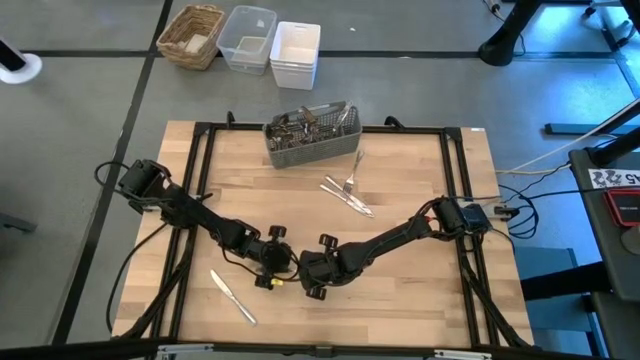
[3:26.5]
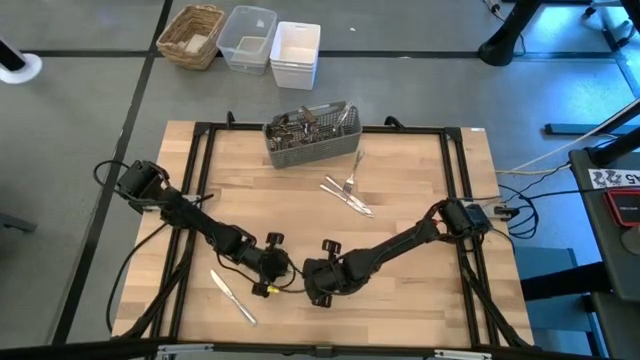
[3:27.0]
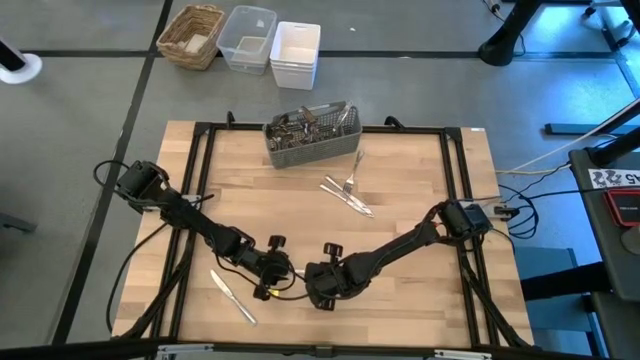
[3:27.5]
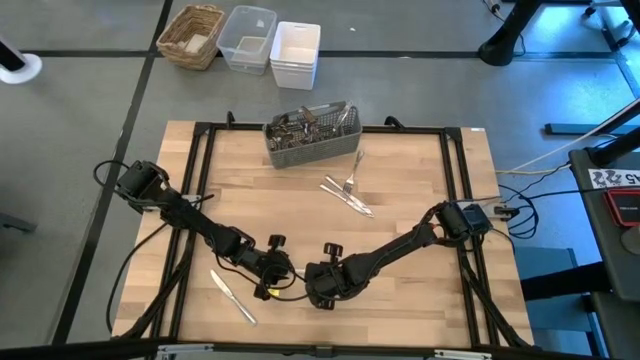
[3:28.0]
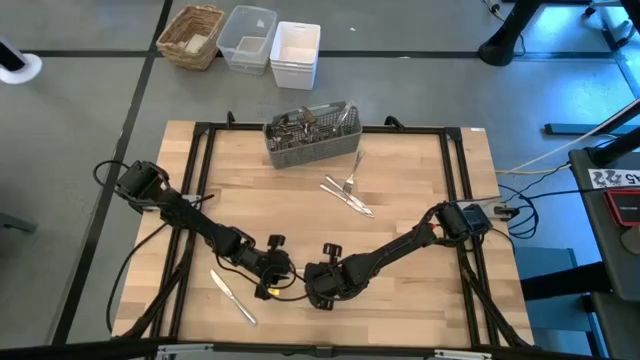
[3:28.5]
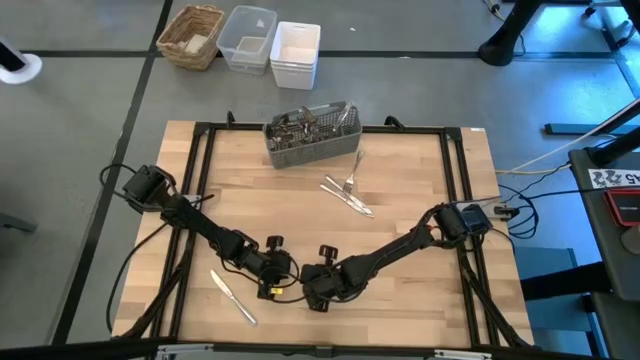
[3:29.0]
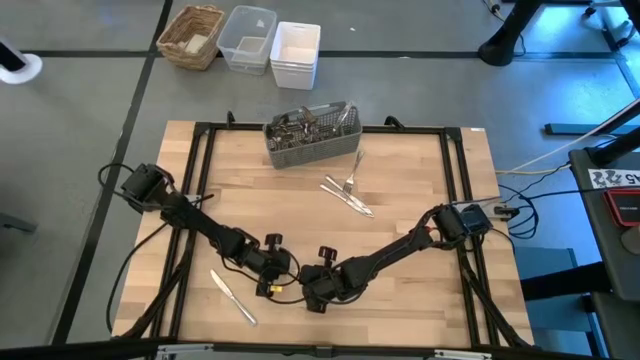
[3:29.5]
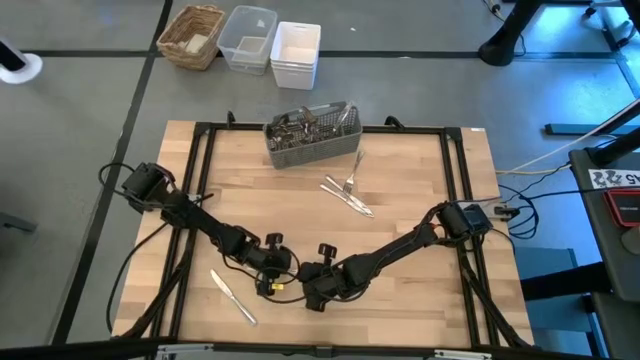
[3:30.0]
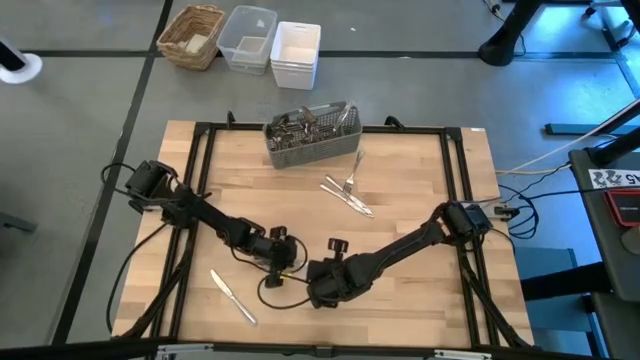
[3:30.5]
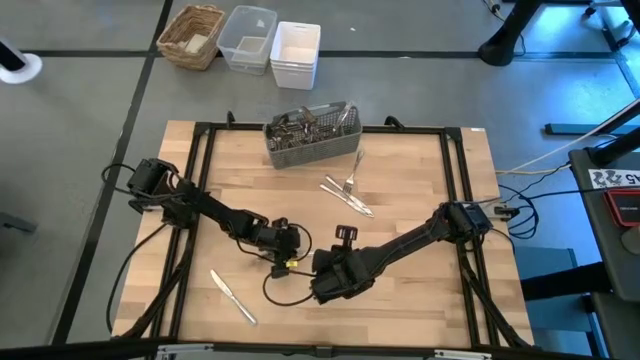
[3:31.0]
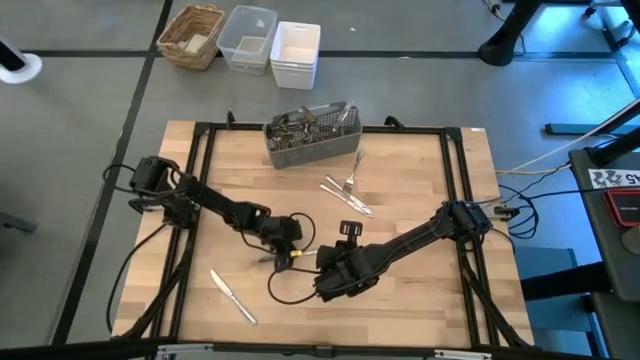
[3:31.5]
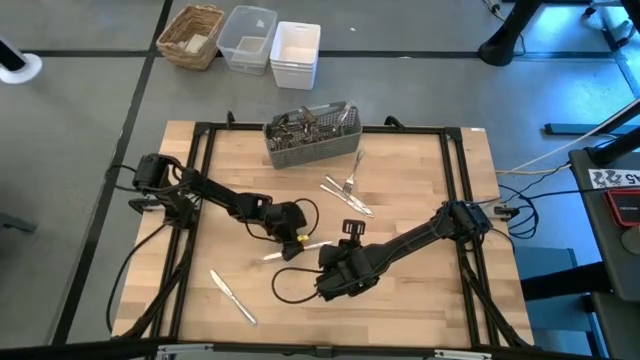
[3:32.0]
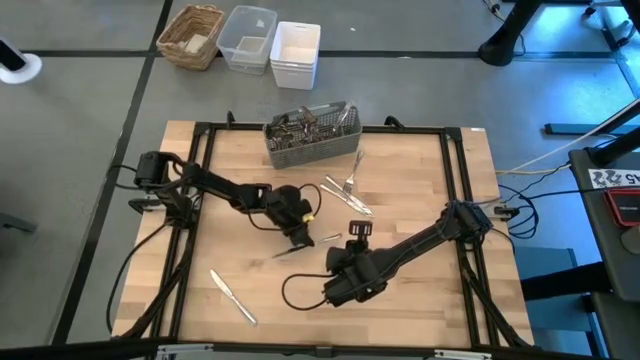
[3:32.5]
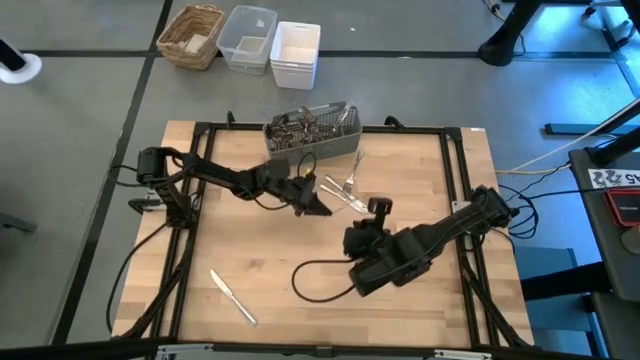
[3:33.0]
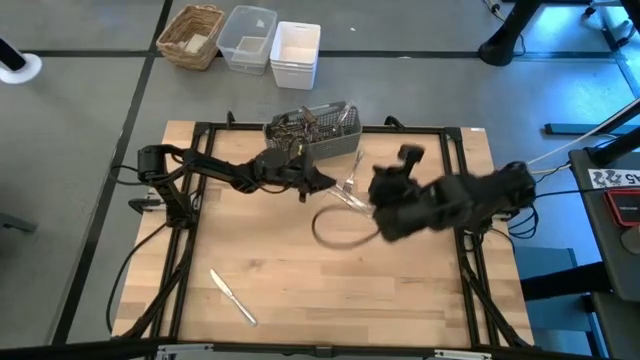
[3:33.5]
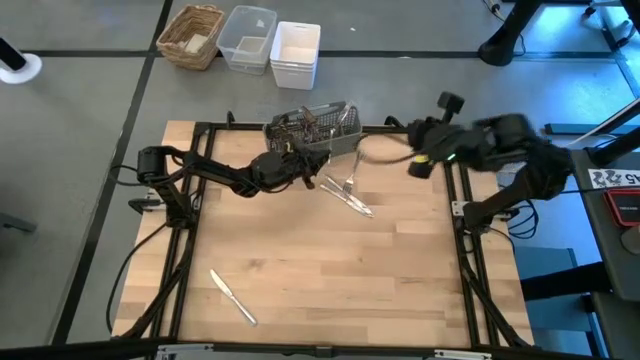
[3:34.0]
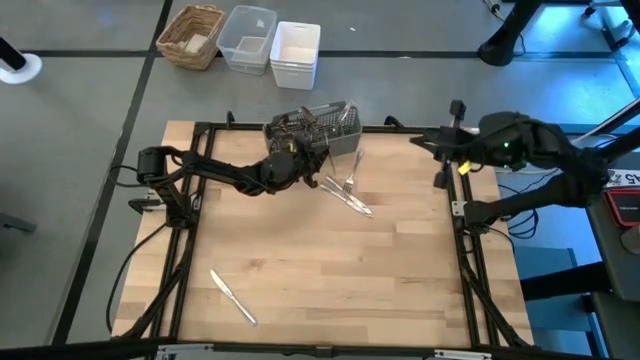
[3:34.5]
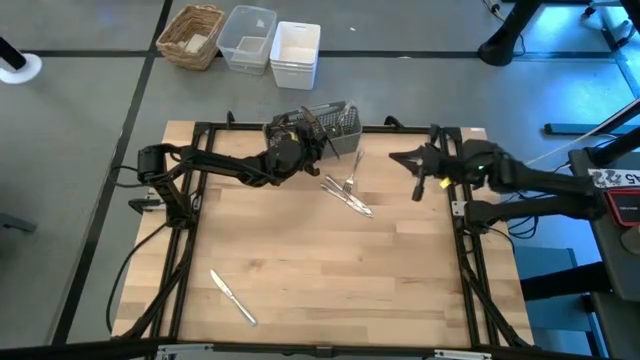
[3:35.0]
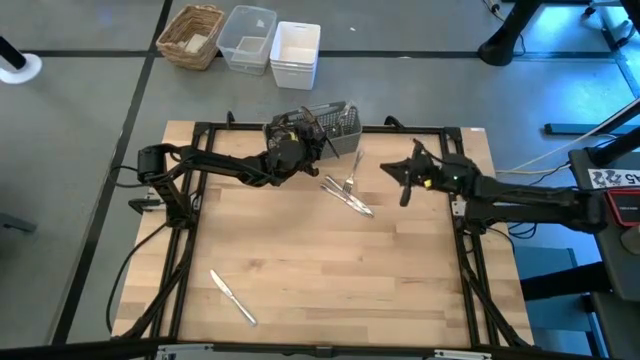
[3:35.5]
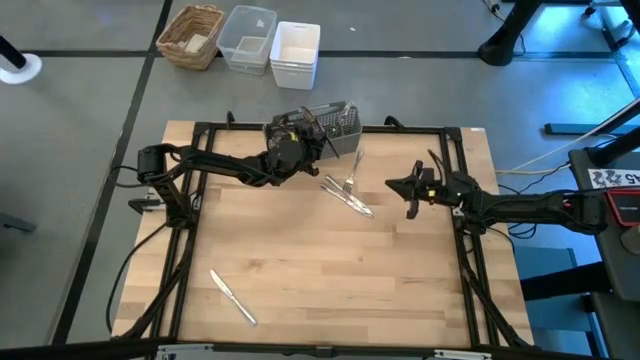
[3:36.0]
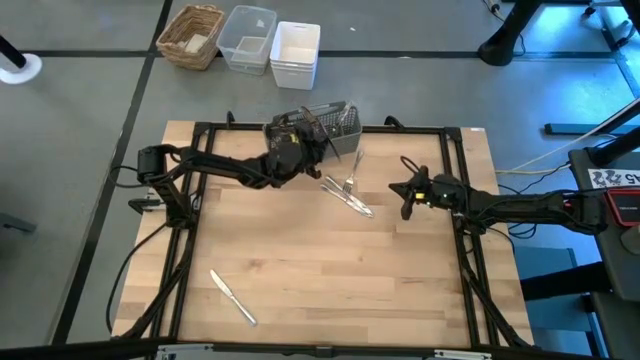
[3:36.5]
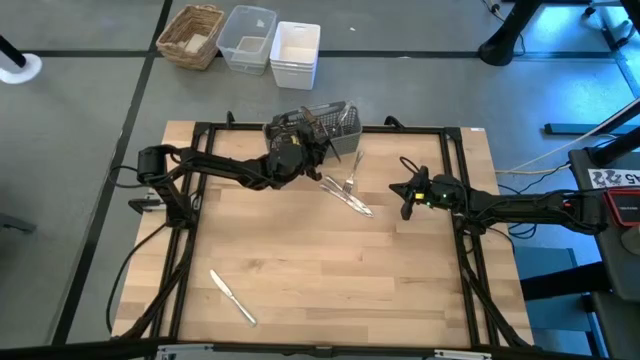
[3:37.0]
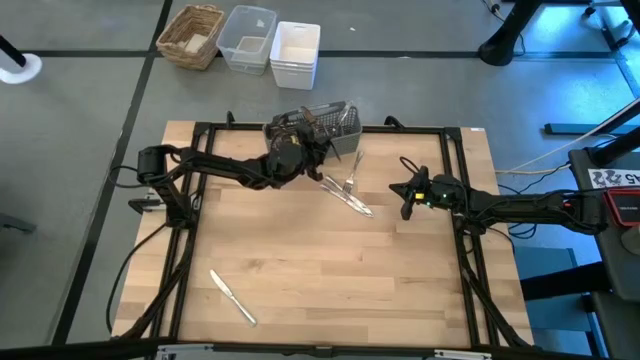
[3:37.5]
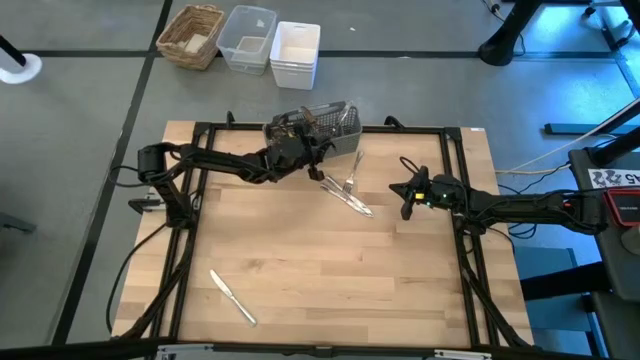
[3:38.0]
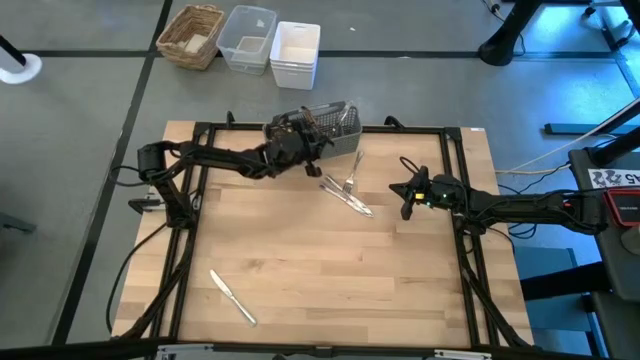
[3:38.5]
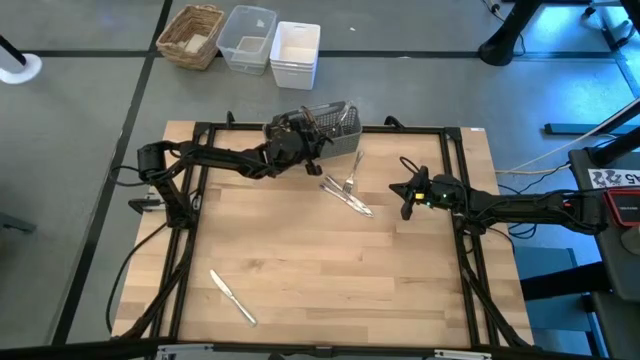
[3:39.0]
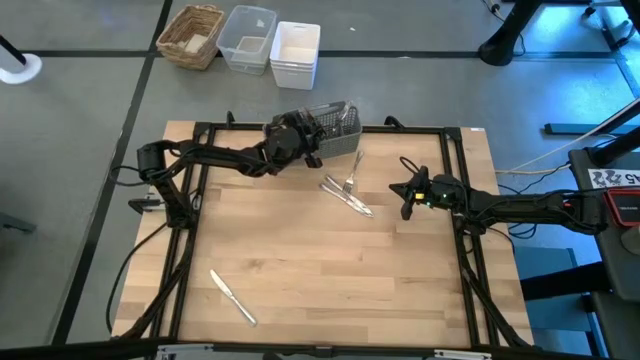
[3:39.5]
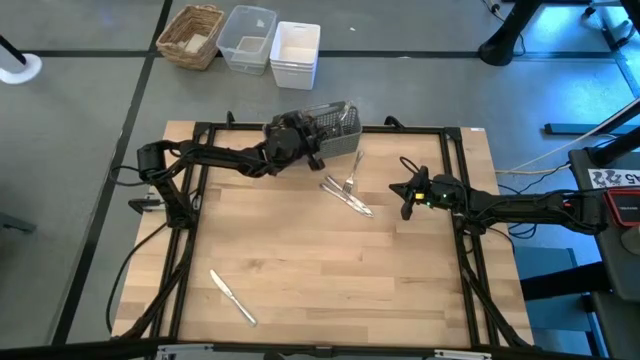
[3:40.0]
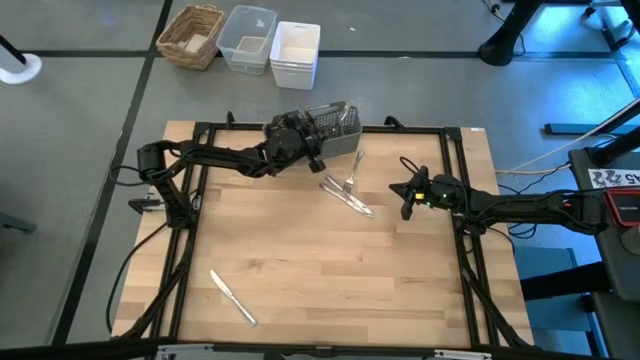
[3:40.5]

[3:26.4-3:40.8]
Task: Sort silverware
Put the silver spoon into the silverware rack

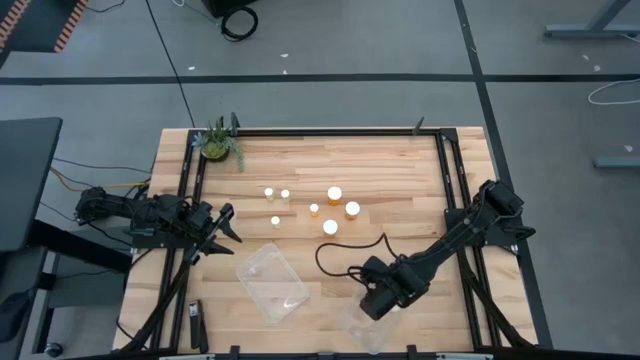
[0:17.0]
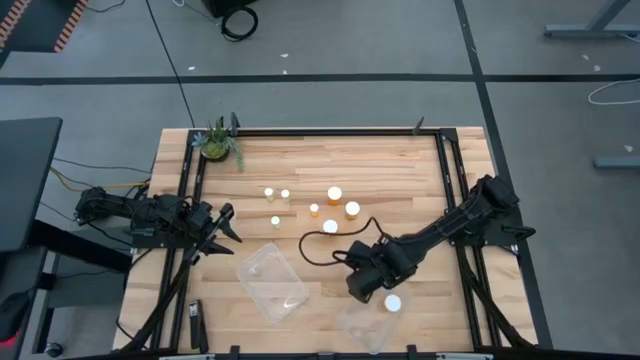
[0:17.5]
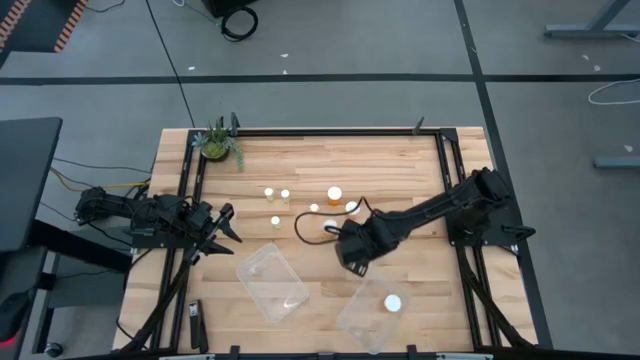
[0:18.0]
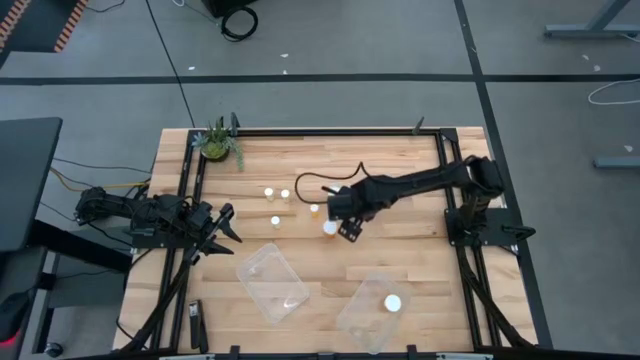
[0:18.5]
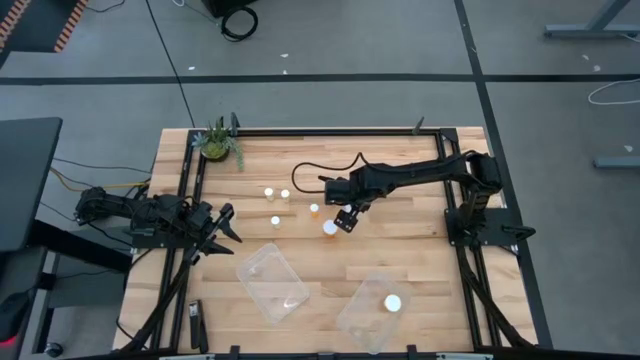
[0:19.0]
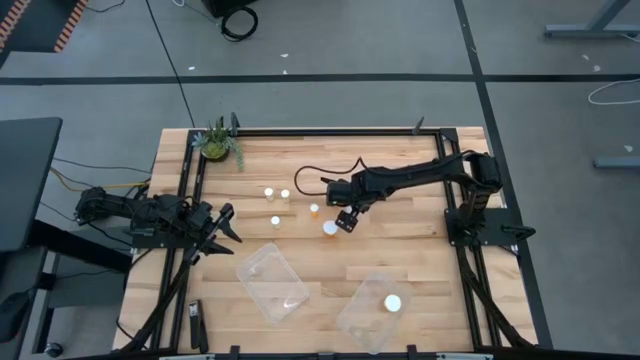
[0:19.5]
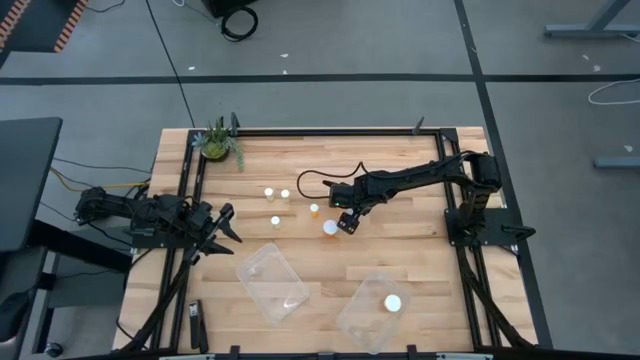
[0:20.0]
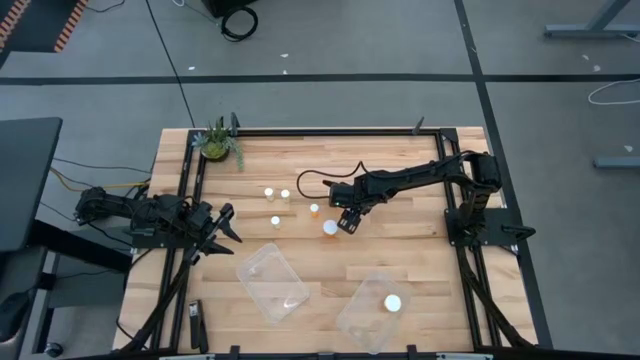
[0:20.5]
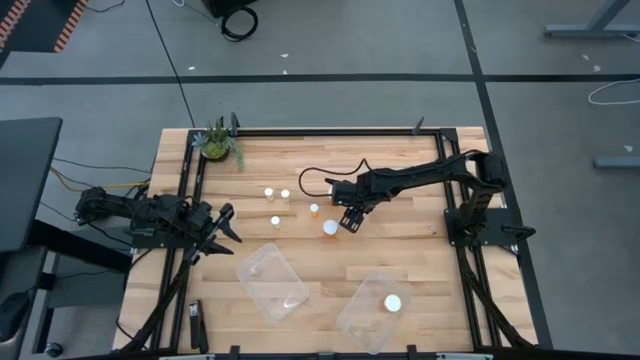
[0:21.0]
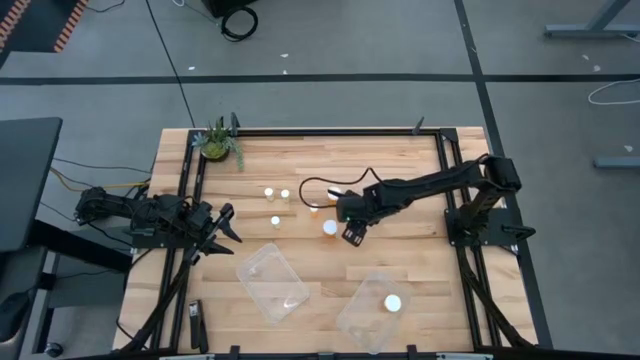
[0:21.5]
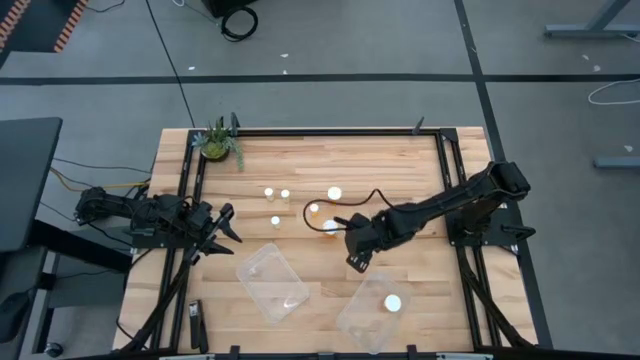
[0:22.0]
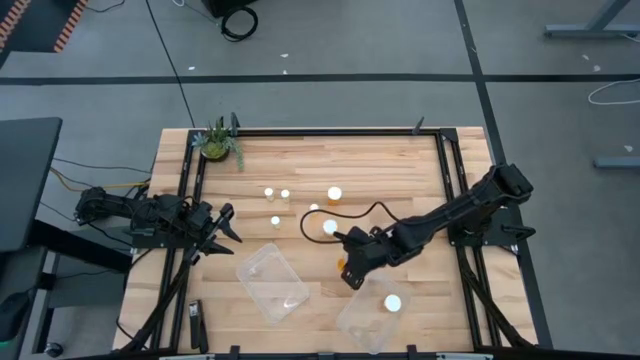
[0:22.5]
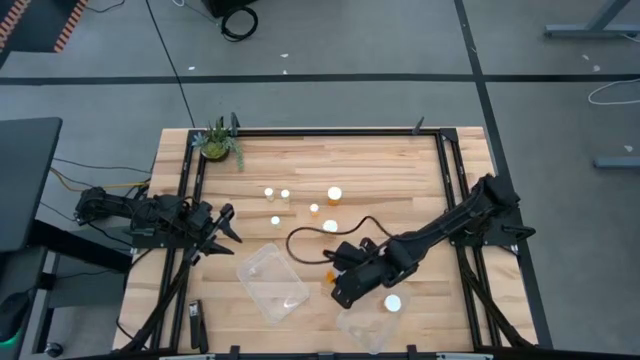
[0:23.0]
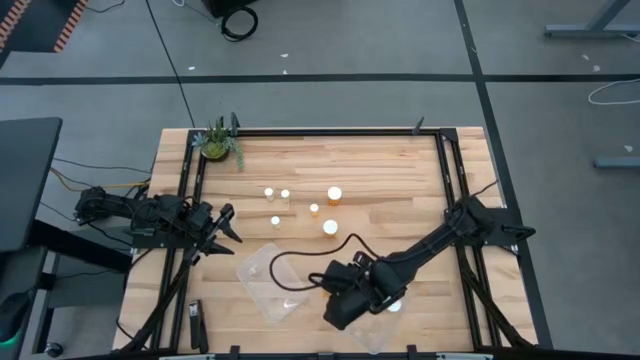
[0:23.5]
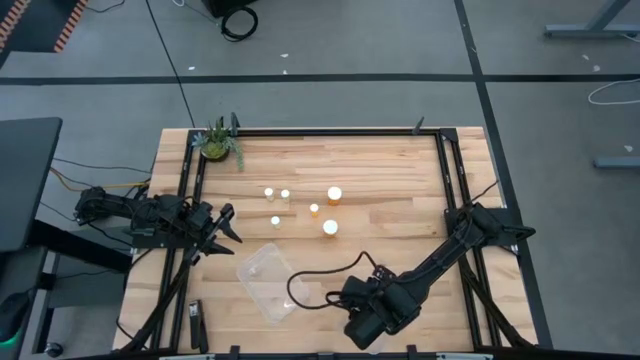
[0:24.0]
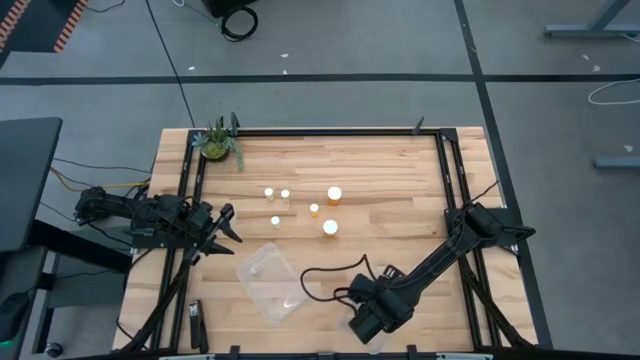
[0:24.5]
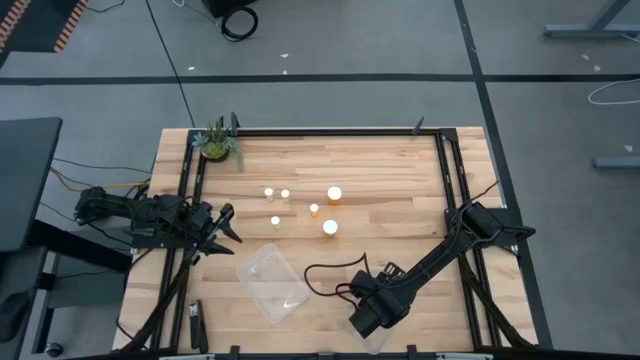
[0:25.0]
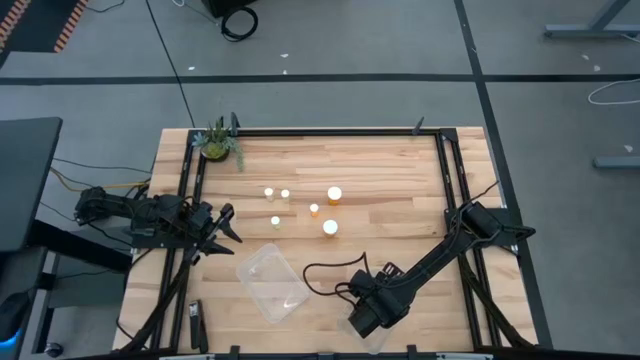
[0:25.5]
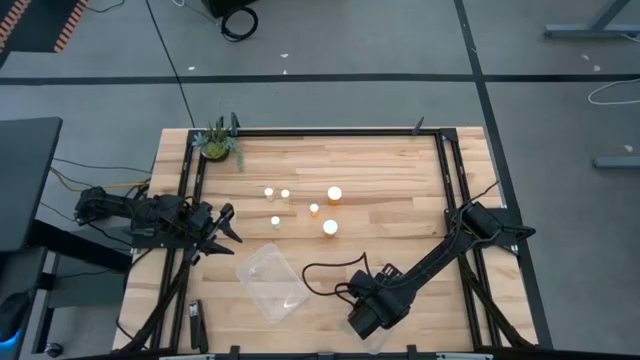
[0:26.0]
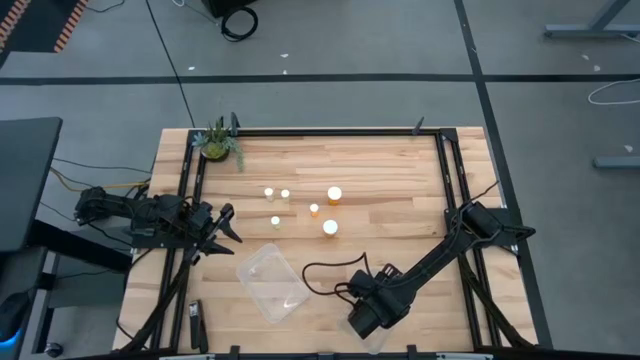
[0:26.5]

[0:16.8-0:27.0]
Task: Pick and place medicine bottles into bin by pill shape (circle, oval)
Put the large orange pill bottle into the right transparent bin
